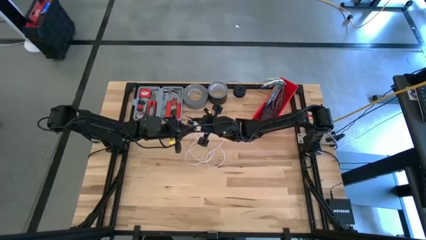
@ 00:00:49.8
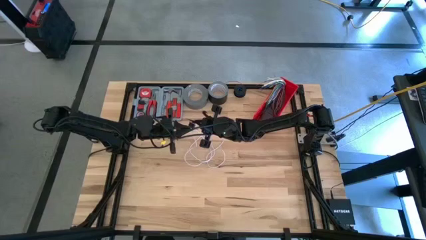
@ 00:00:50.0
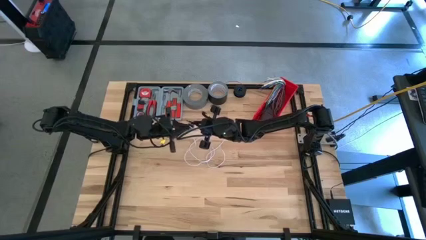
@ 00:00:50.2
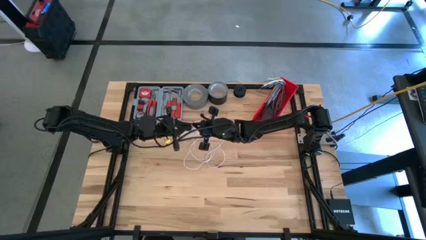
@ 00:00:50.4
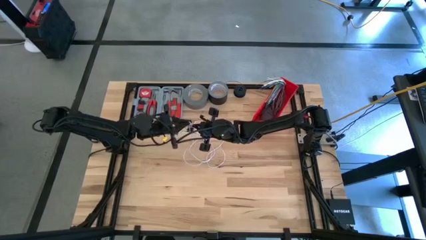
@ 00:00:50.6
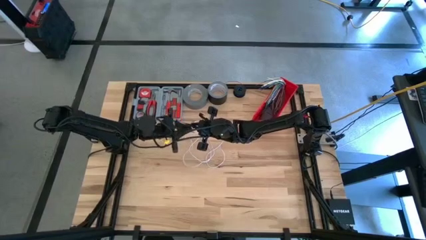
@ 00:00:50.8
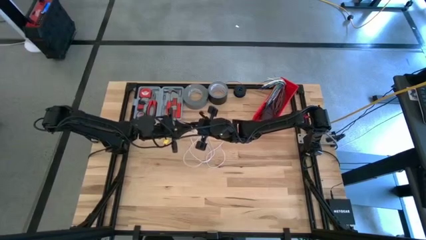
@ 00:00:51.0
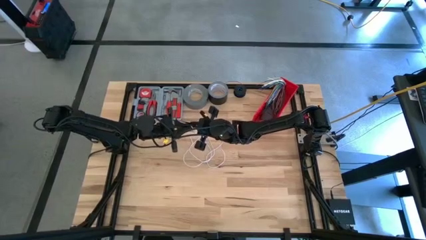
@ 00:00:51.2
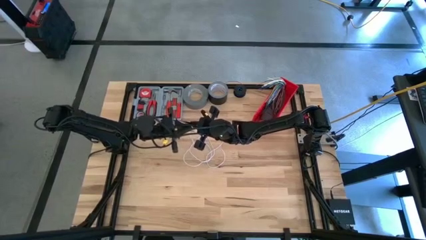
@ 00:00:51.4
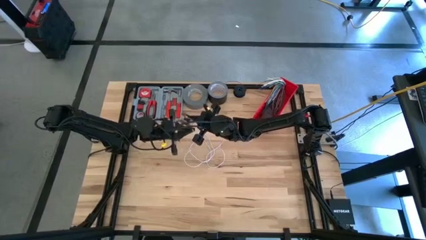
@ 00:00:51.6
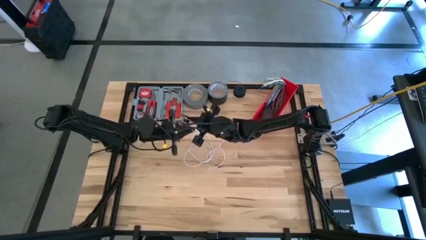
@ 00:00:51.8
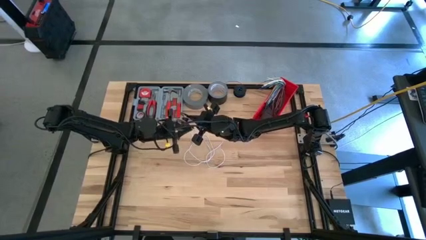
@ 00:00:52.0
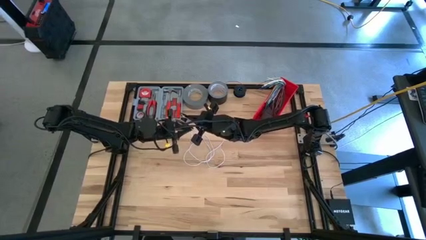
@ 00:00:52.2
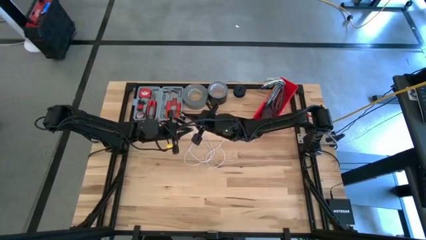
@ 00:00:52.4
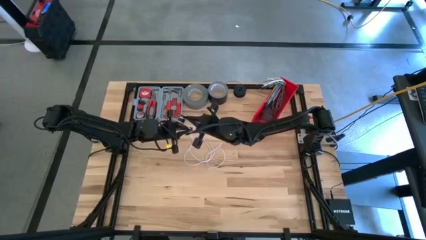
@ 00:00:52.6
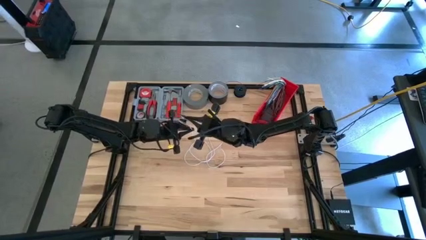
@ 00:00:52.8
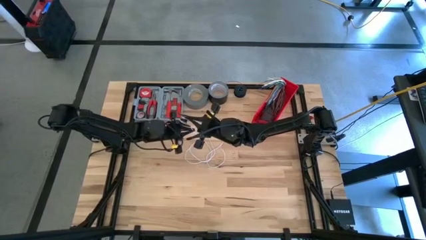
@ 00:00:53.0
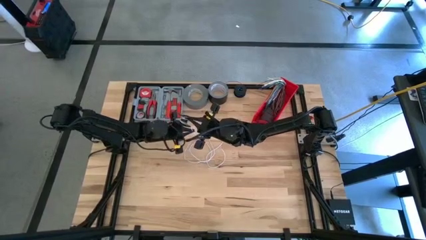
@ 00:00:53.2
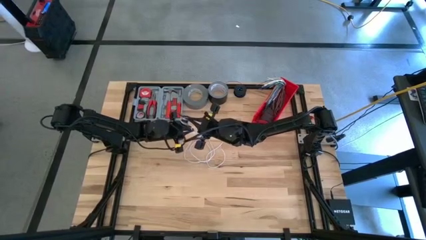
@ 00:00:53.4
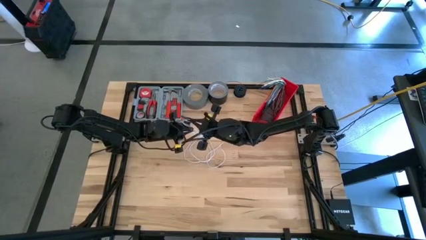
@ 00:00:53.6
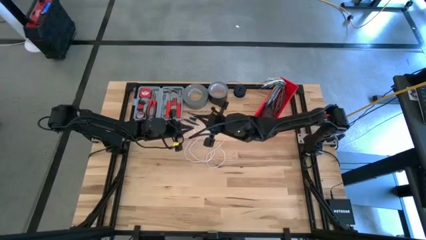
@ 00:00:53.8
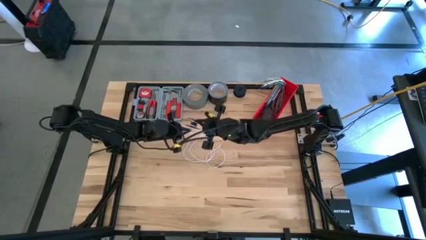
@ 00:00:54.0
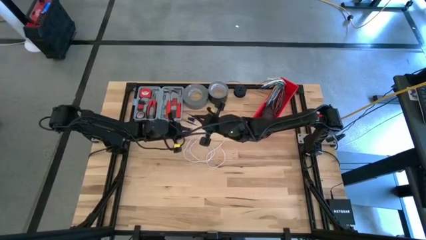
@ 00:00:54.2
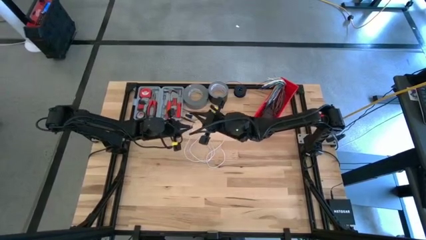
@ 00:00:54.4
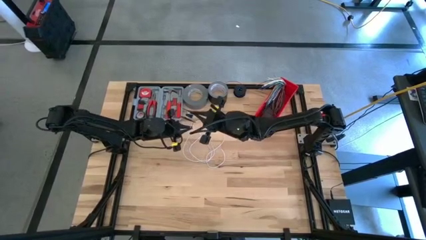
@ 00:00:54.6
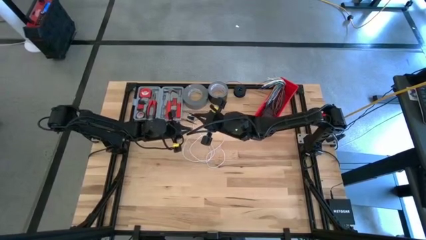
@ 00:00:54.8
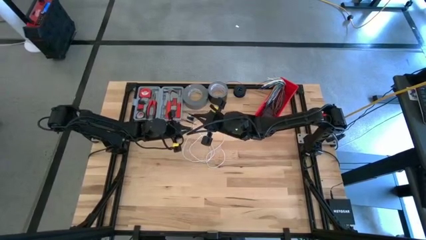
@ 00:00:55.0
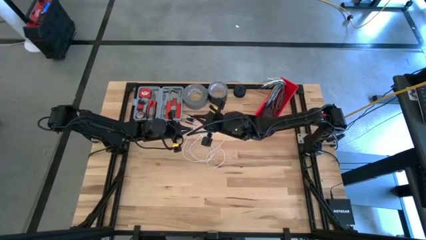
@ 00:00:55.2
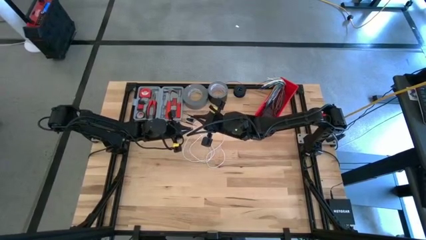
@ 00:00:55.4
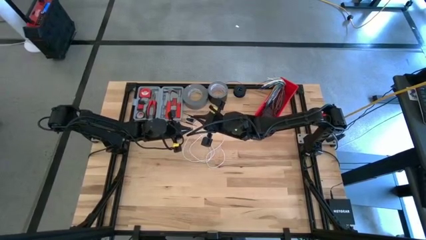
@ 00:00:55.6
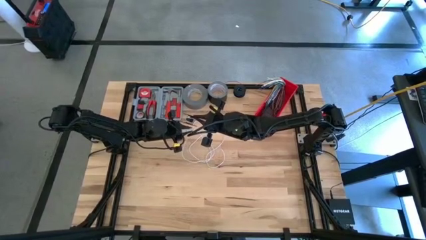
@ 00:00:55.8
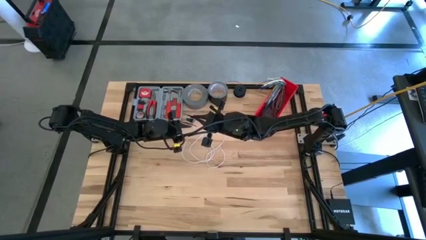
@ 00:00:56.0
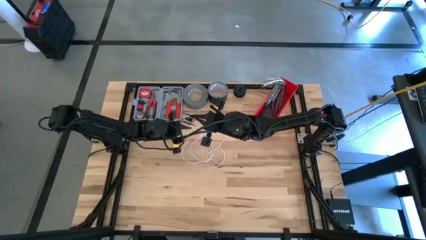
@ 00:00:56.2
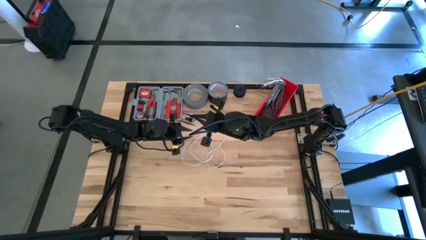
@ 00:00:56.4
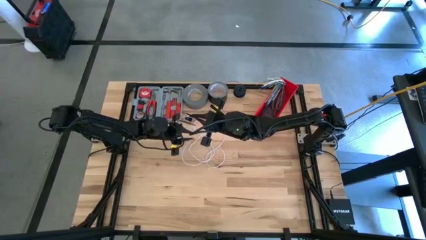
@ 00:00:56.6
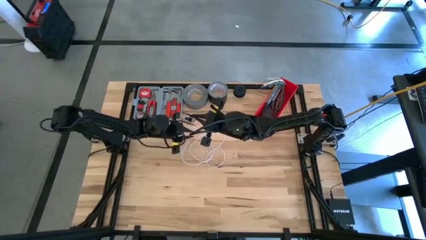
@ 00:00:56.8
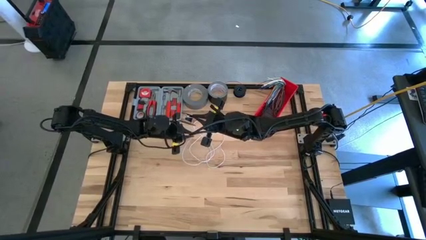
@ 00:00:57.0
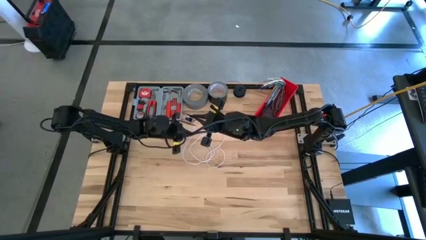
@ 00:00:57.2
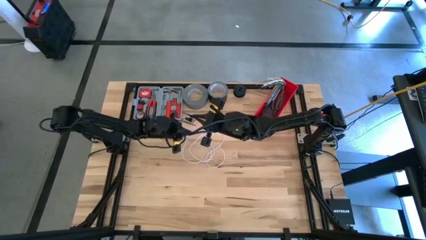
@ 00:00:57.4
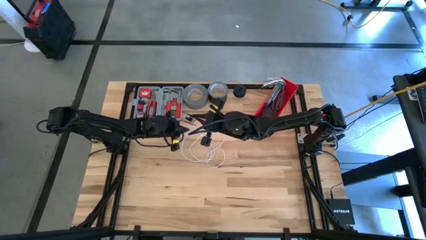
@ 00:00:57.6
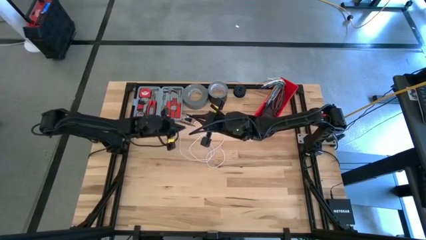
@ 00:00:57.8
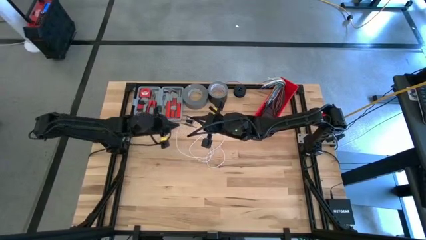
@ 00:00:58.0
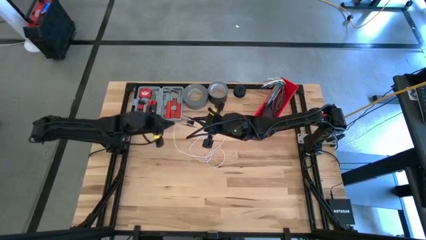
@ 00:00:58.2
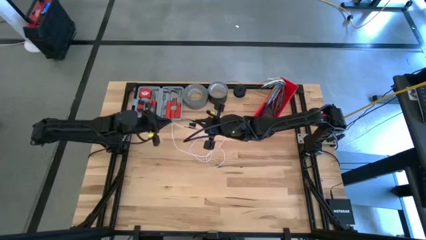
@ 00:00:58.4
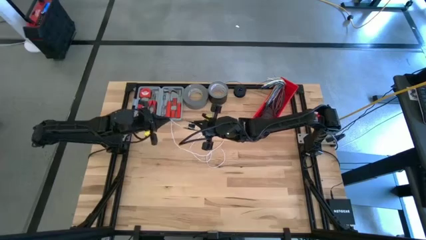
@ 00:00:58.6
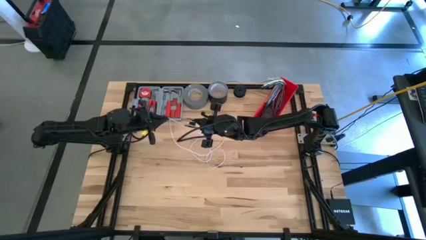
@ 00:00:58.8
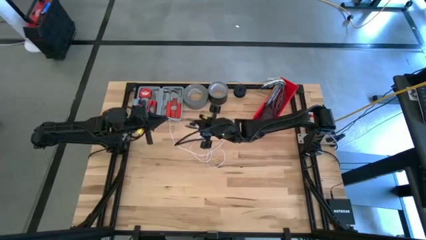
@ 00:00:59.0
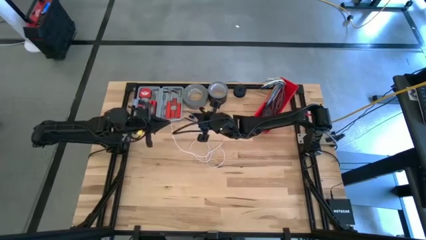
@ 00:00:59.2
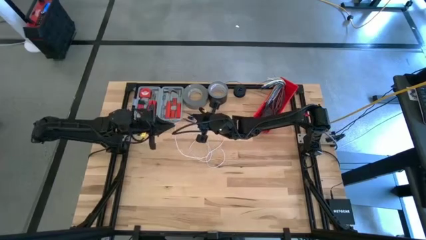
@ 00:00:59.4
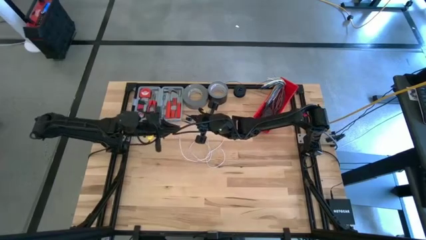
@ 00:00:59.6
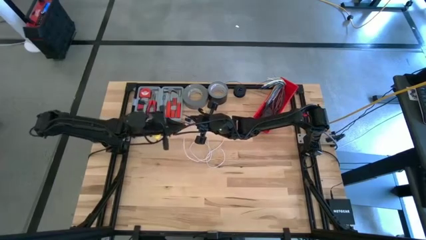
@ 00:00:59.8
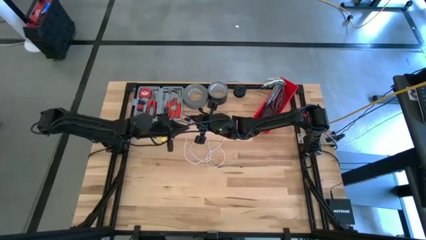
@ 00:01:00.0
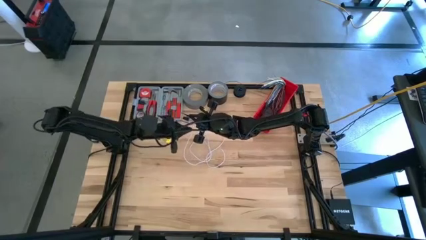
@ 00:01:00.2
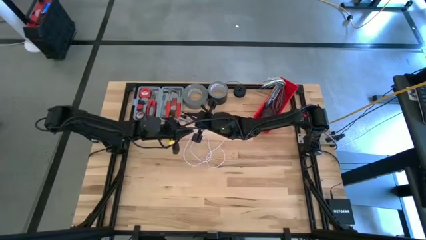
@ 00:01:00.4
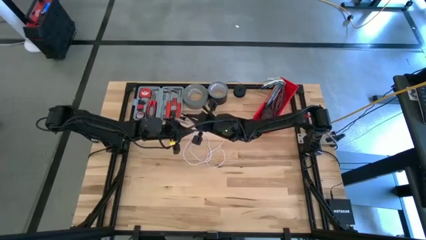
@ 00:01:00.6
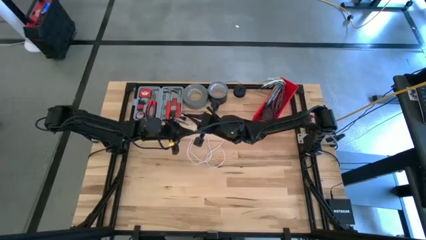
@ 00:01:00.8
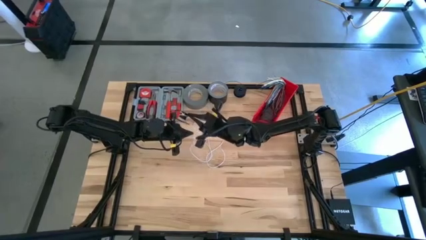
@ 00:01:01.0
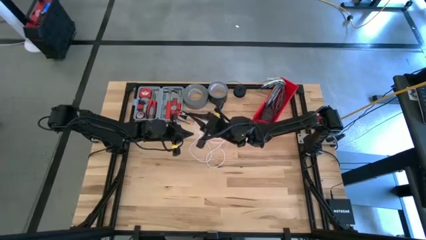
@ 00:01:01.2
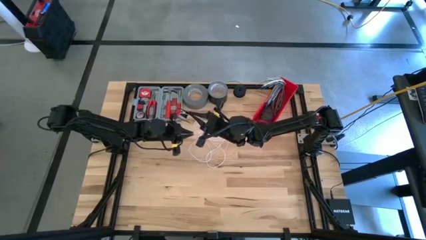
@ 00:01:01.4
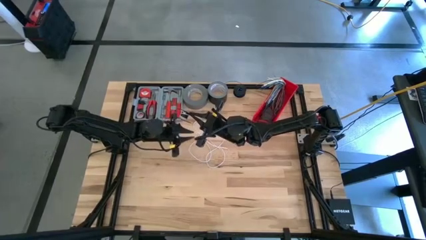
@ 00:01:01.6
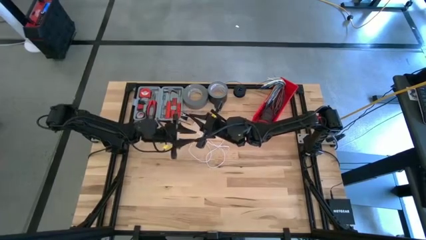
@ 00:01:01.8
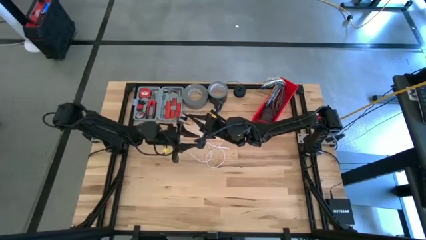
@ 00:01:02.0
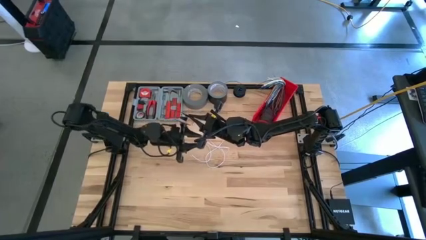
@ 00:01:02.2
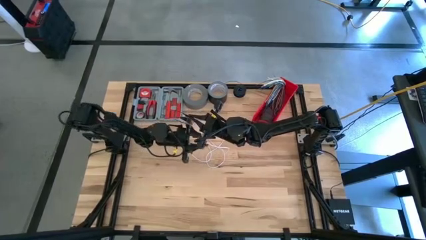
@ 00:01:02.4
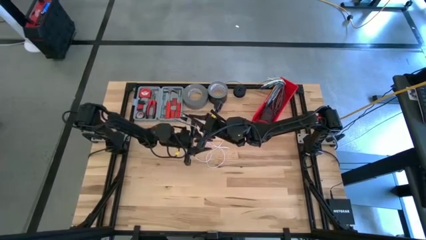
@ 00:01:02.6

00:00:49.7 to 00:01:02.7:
Task: Coil cords
Coil the white wire on the black spool

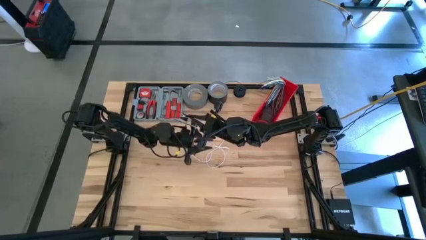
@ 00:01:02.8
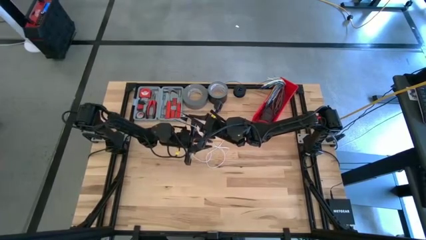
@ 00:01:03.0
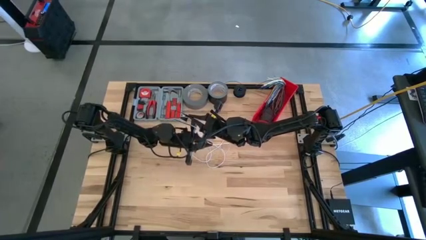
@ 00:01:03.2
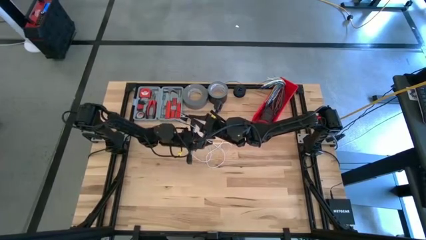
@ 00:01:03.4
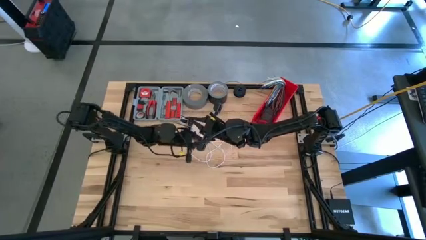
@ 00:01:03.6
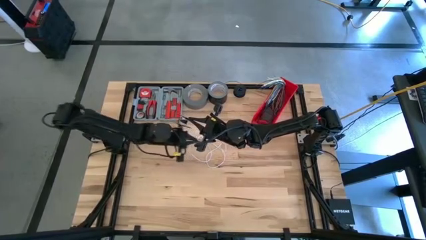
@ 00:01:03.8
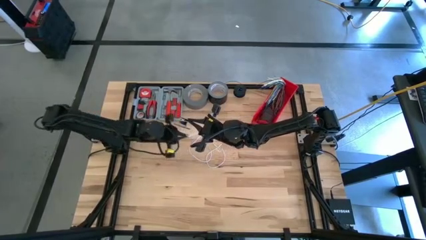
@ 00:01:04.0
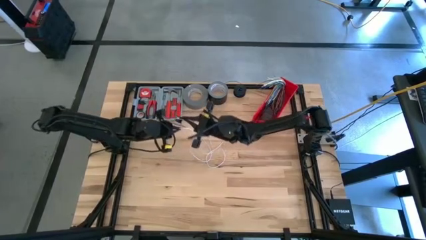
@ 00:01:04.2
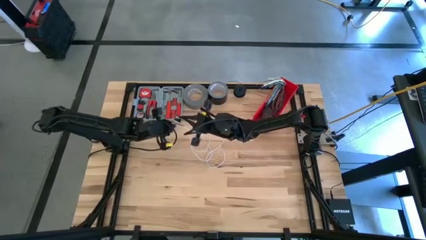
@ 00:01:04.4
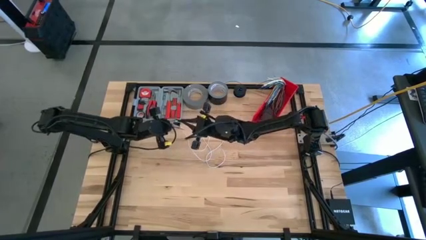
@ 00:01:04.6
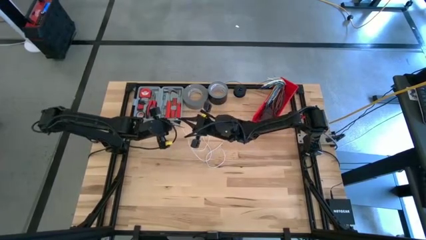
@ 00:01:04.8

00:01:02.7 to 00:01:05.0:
Coil the white wire on the black spool
